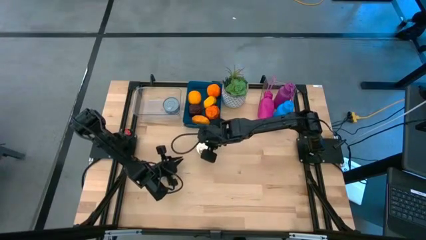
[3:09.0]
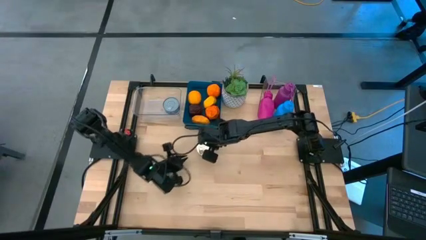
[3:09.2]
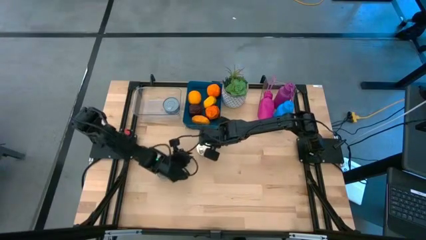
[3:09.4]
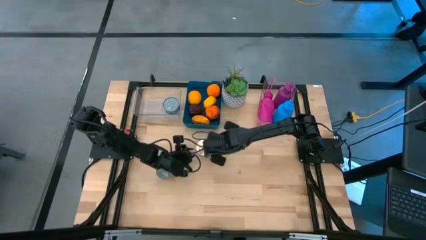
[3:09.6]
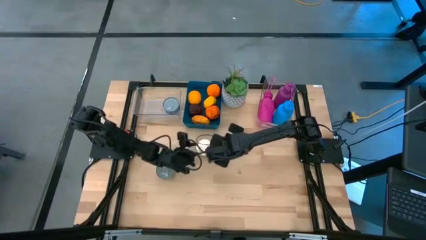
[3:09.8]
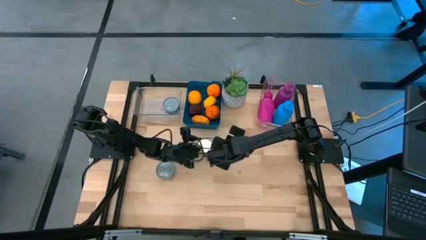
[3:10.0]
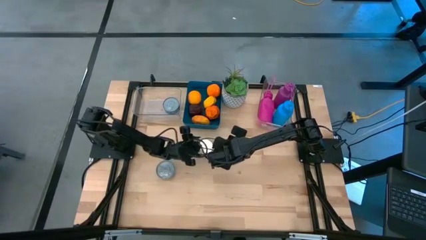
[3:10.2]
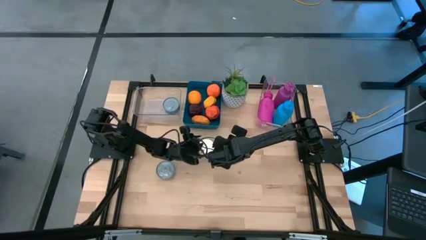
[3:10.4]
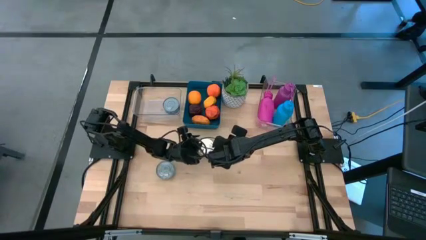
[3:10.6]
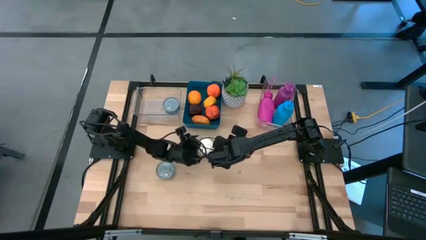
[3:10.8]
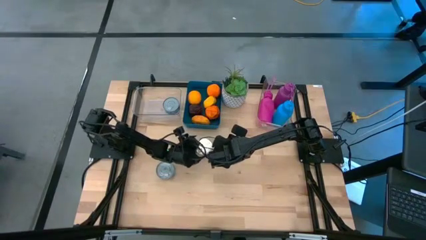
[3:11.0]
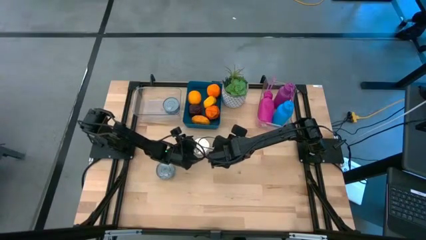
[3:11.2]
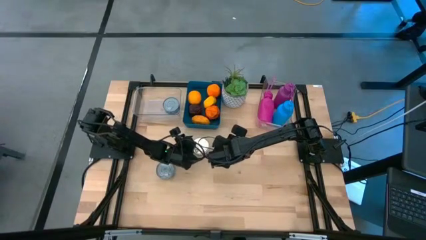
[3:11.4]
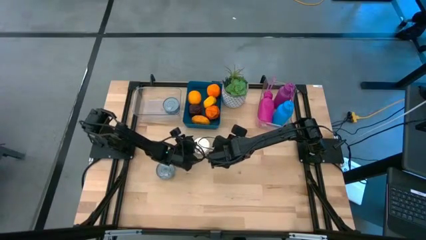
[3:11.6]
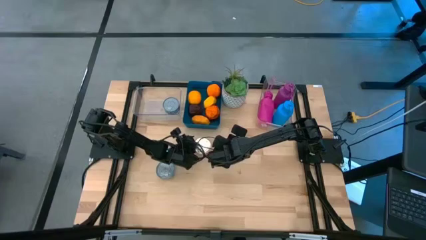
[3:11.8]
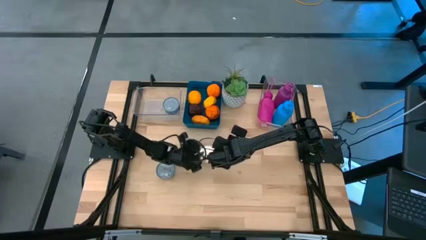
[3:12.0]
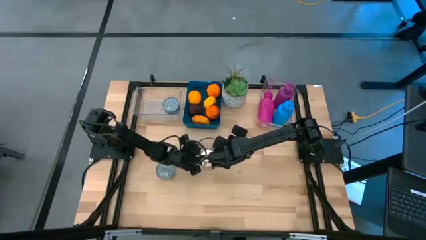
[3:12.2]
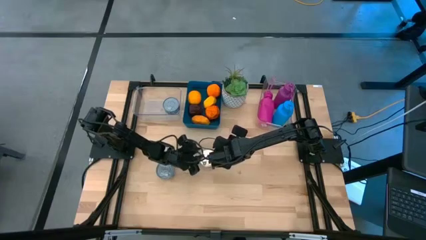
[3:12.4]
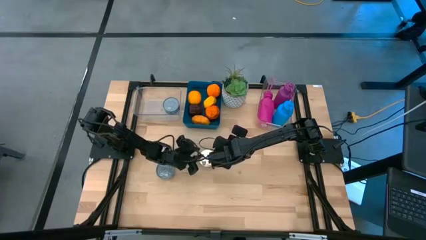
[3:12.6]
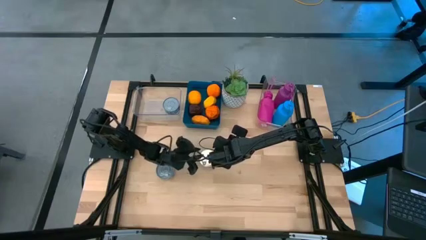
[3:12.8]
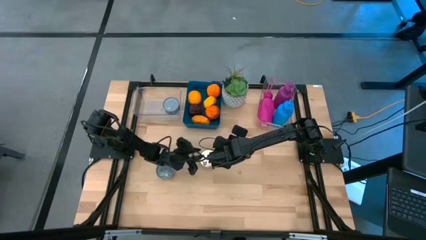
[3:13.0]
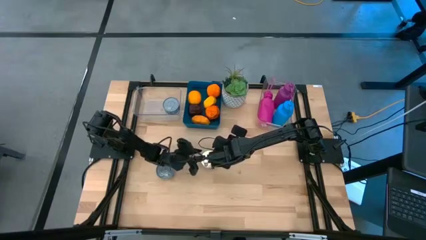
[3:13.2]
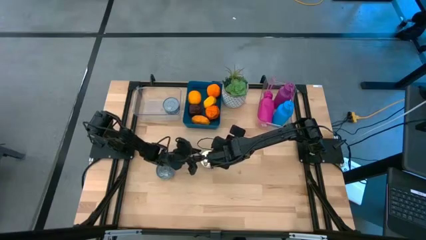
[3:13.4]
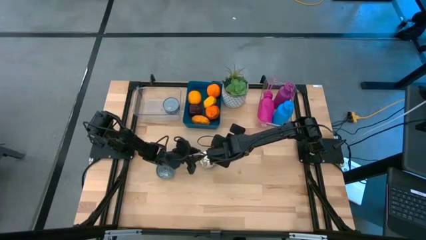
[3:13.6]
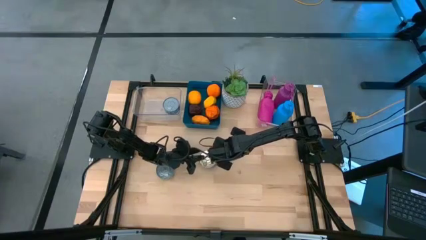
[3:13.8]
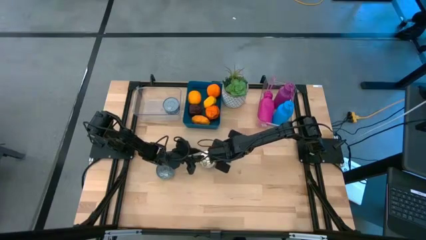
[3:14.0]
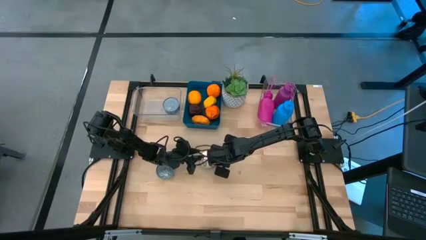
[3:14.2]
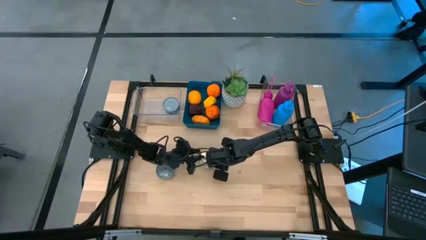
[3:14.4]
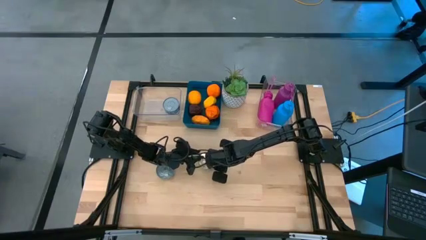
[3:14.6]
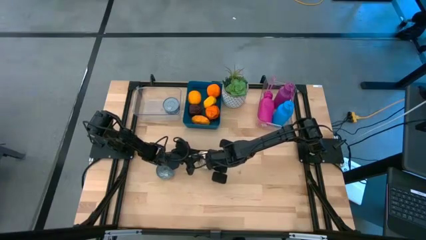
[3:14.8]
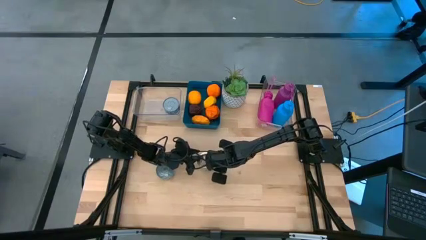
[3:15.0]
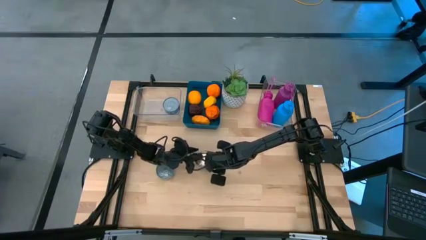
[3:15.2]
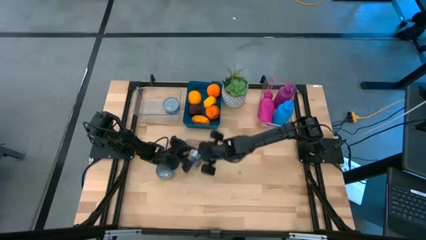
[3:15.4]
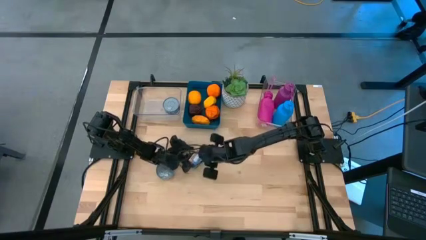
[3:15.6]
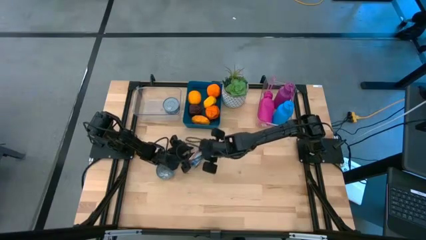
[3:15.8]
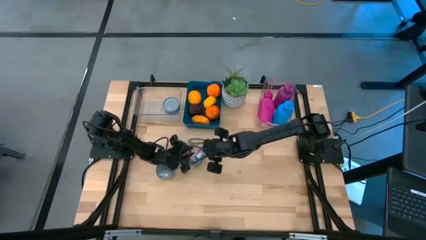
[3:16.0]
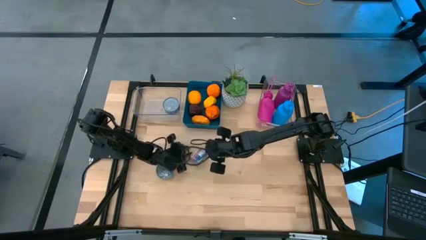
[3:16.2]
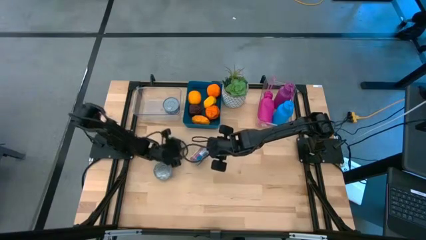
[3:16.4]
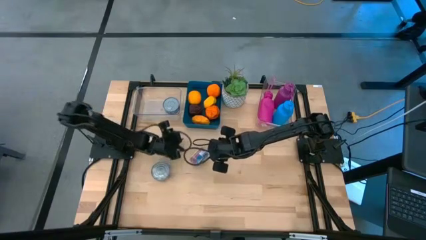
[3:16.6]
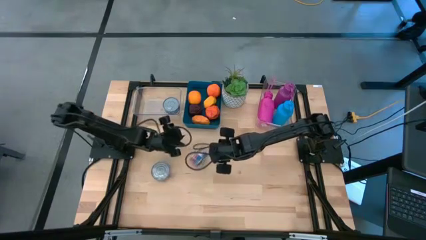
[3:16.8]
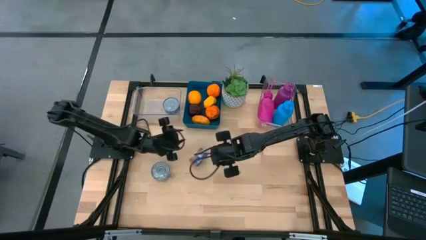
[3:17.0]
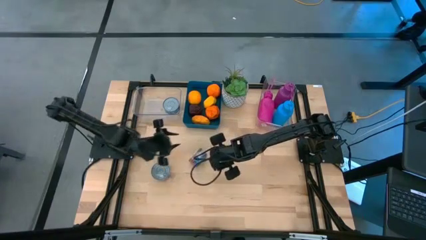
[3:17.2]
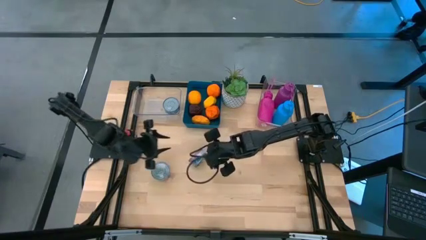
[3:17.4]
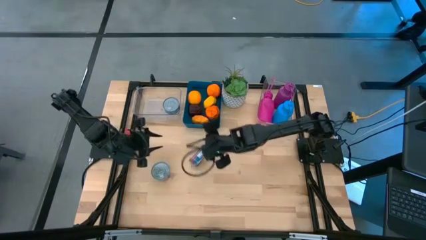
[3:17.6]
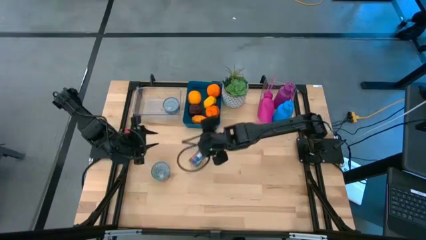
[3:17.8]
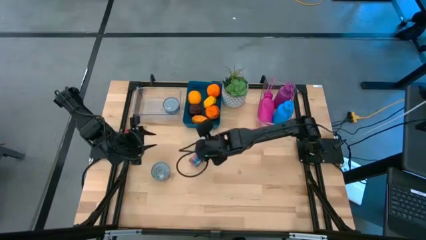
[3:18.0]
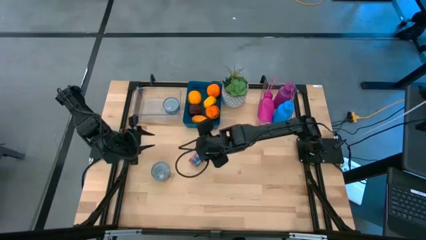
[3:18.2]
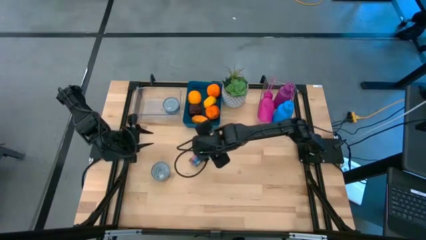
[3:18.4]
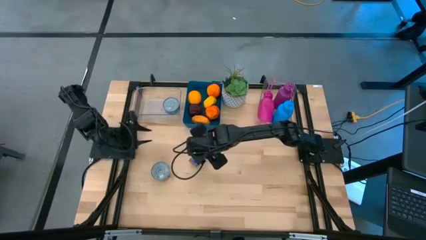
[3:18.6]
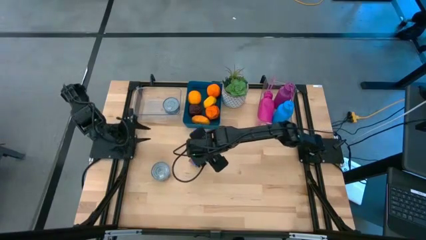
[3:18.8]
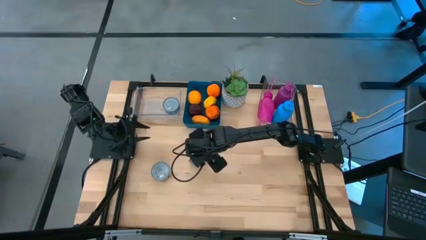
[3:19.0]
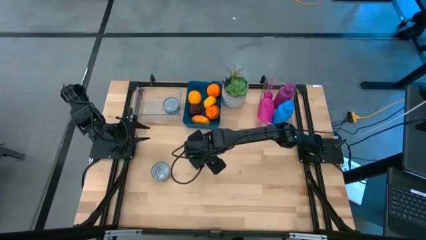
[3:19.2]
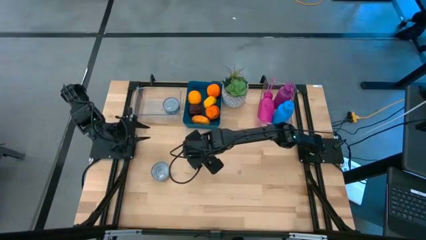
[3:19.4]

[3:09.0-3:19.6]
Task: Pick & Place Food Item
Stack the blue and pink tuna can on top of the blue tuna can into the left transparent bin

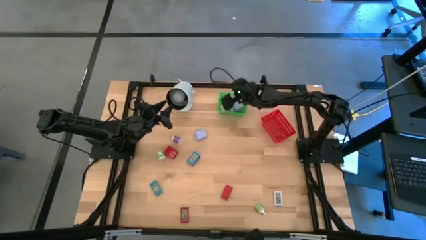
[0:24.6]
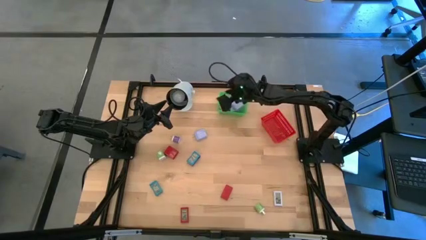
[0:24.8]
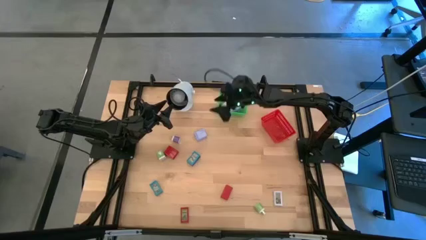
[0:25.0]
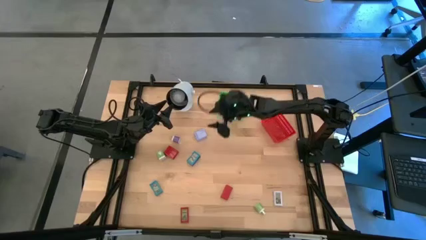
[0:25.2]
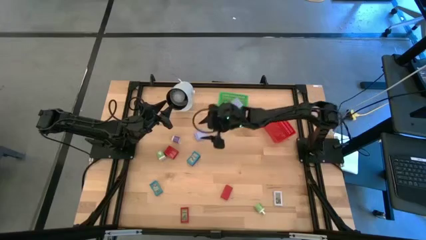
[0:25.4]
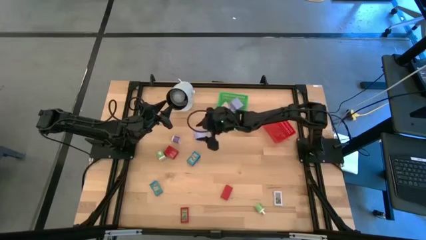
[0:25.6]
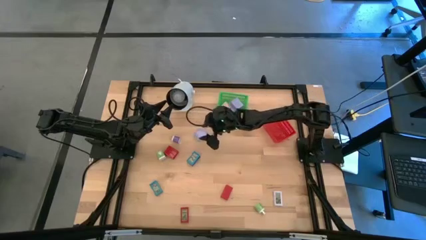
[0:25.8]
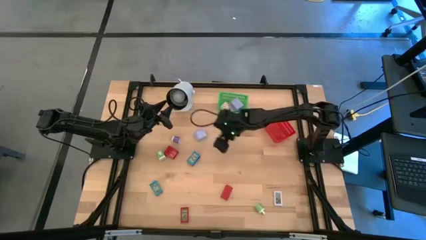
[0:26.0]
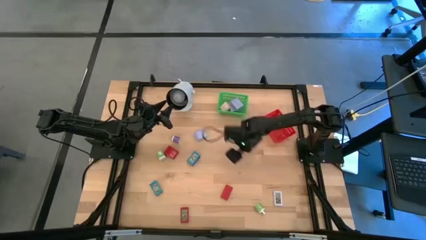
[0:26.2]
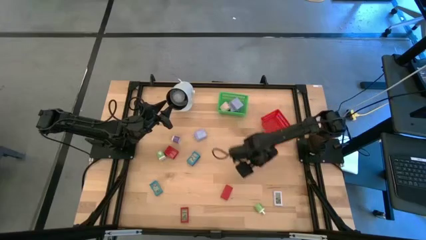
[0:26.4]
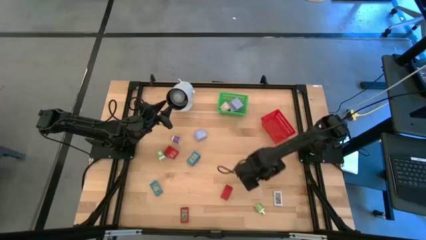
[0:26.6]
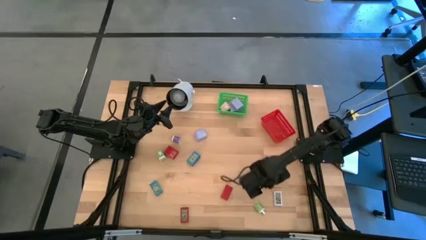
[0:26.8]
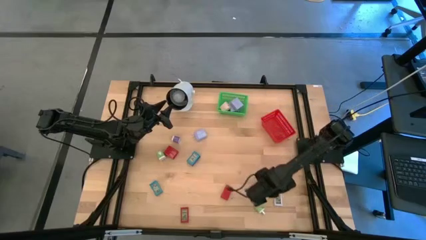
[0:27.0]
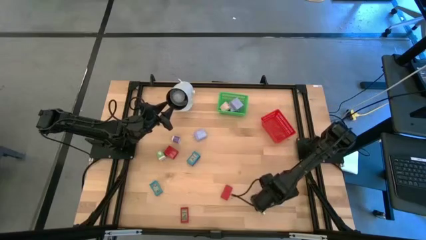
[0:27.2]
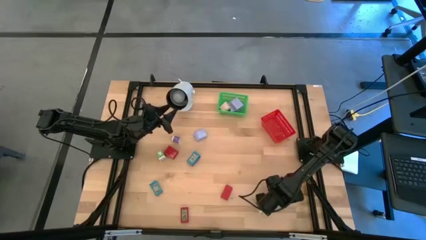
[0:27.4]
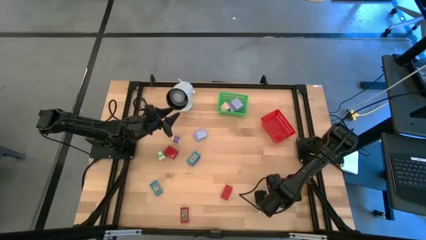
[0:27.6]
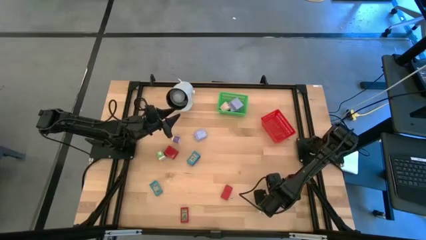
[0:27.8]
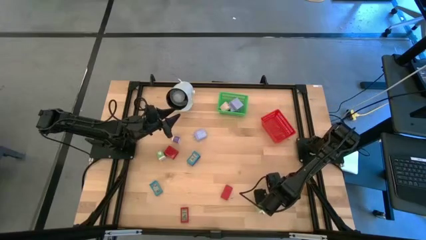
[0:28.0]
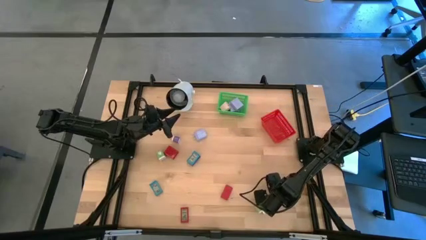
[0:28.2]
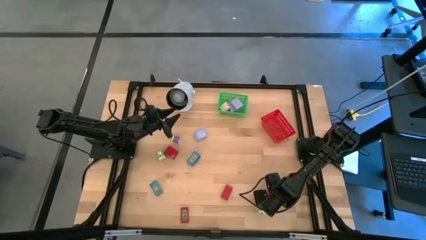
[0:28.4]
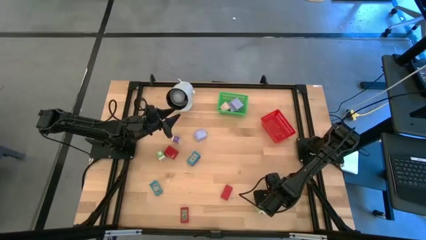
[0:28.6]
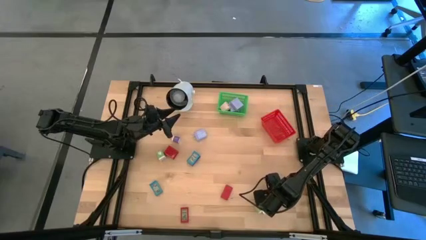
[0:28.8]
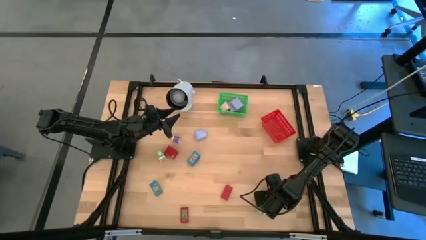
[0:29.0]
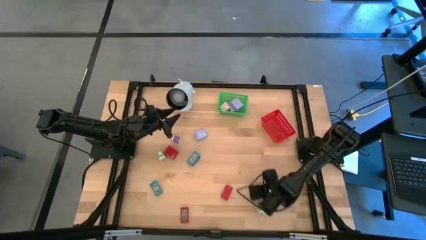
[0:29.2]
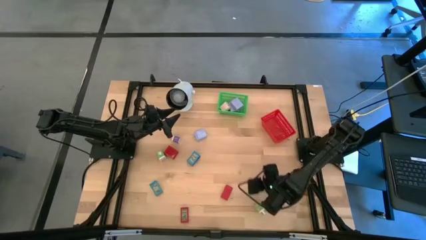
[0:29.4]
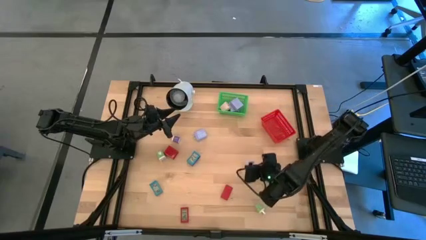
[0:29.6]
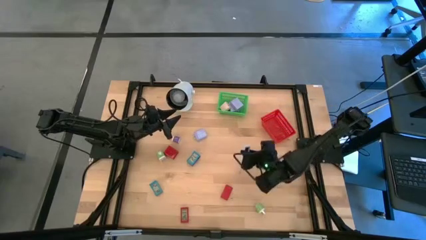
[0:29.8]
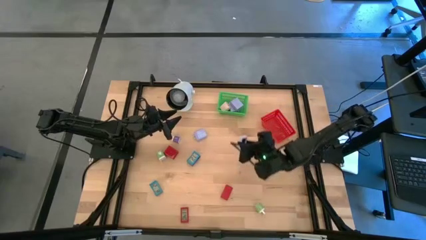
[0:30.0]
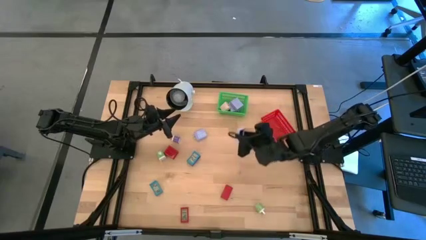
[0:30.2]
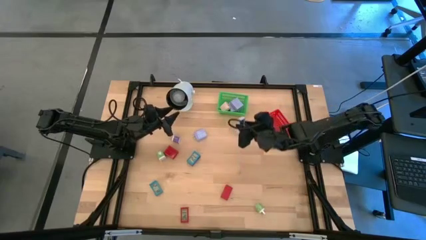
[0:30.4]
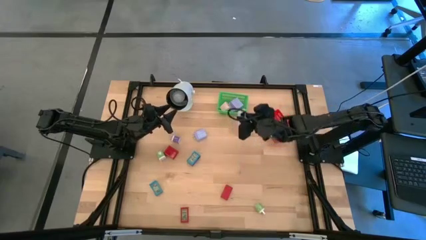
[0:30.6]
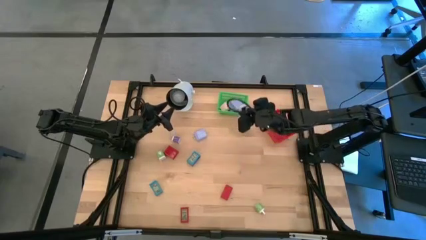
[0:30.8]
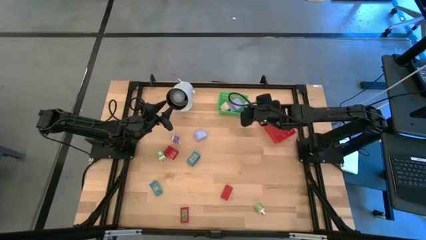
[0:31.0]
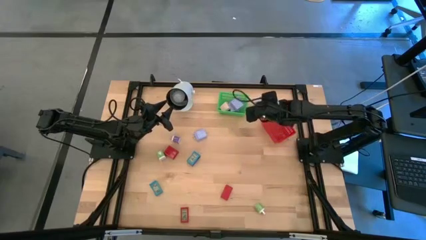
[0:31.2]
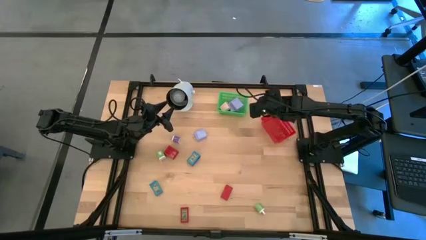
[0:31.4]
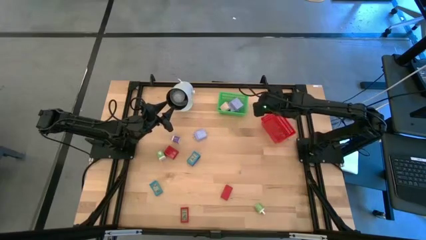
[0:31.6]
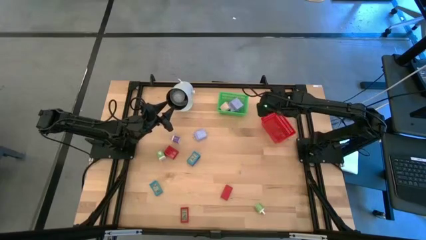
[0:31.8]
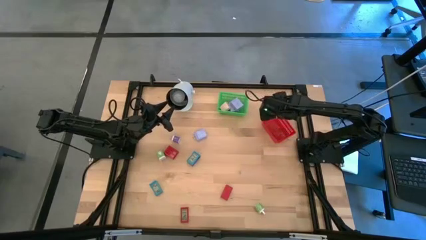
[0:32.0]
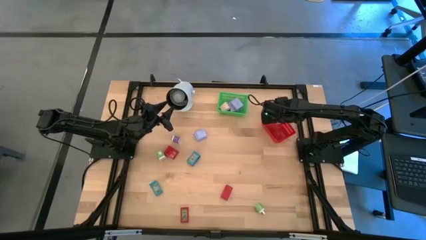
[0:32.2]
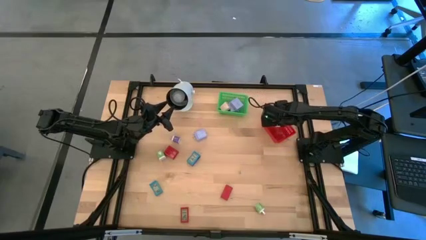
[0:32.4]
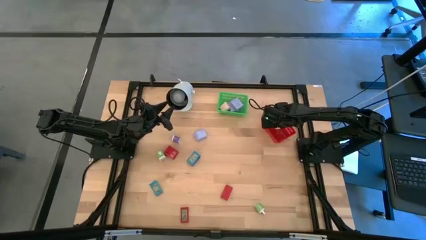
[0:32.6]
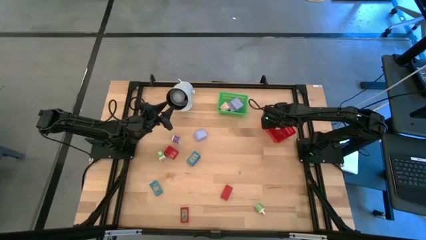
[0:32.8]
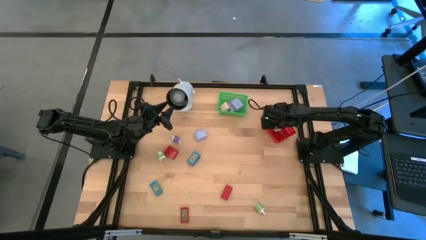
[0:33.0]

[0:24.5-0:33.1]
Task: Pick & Place Office items
Put the white digital timer into the red bin
